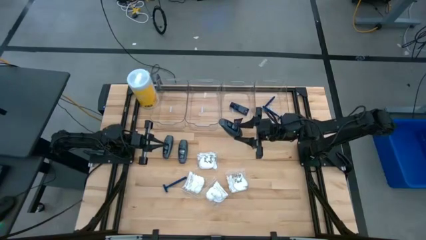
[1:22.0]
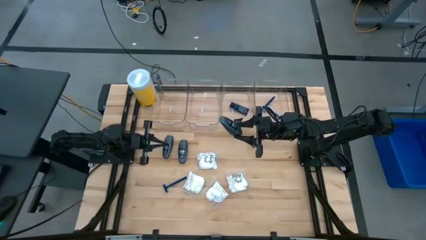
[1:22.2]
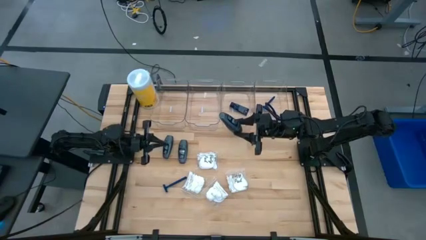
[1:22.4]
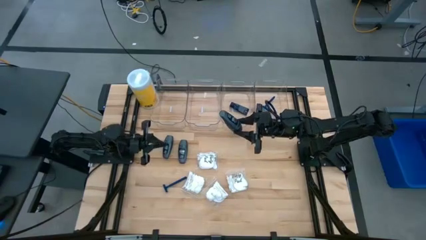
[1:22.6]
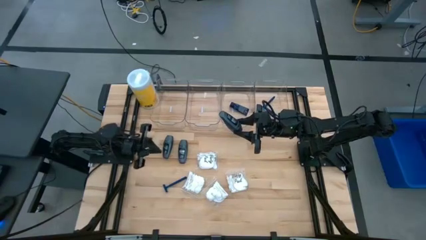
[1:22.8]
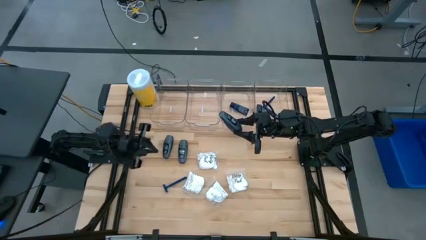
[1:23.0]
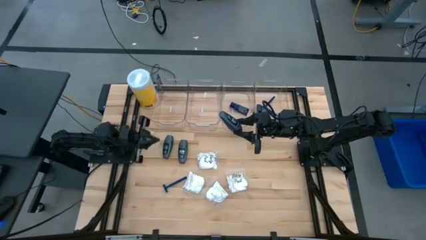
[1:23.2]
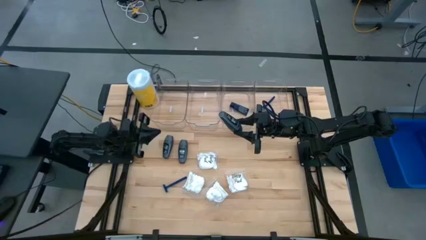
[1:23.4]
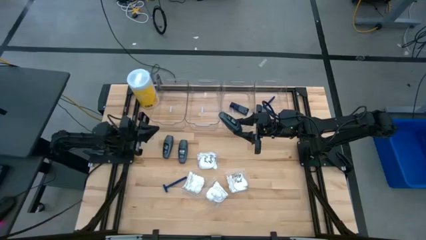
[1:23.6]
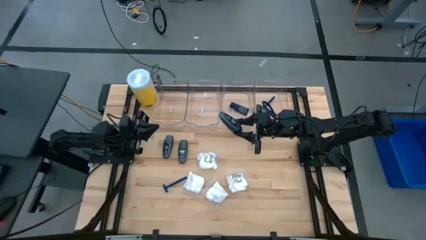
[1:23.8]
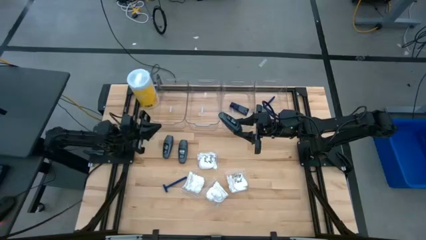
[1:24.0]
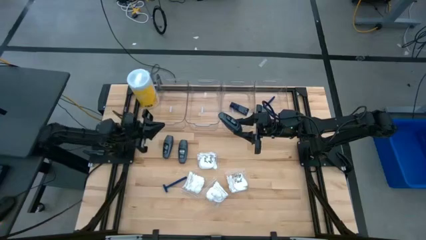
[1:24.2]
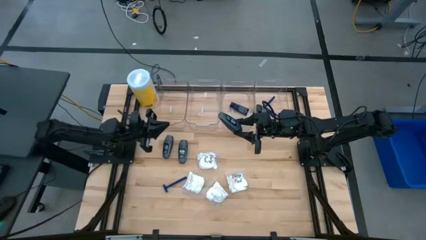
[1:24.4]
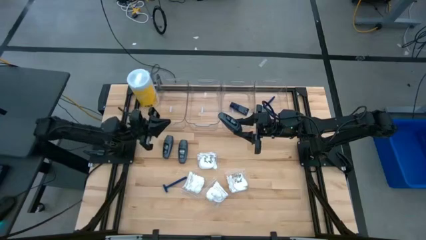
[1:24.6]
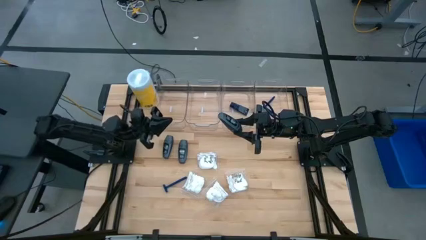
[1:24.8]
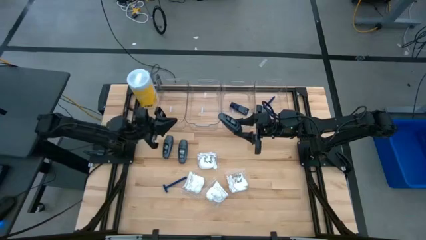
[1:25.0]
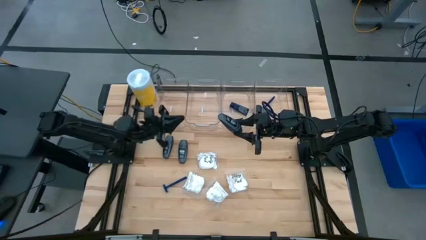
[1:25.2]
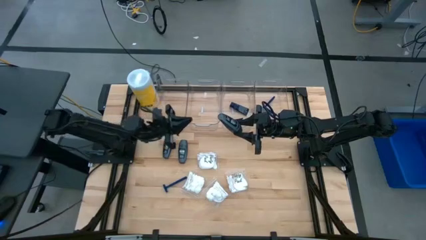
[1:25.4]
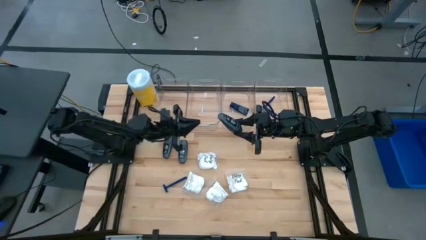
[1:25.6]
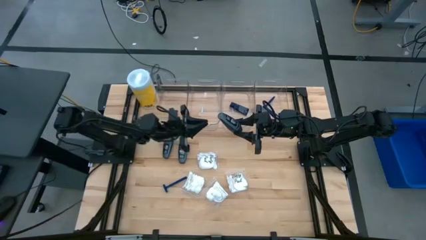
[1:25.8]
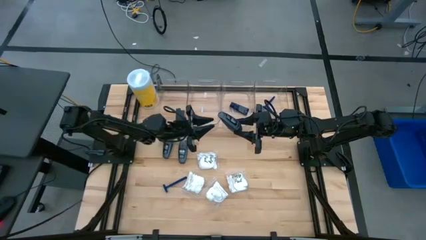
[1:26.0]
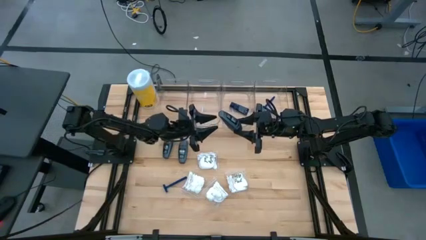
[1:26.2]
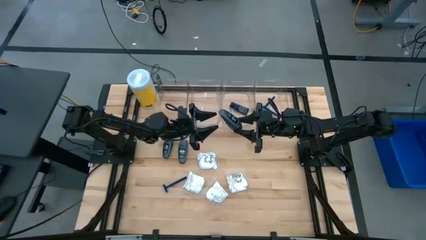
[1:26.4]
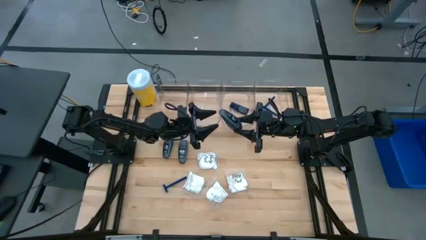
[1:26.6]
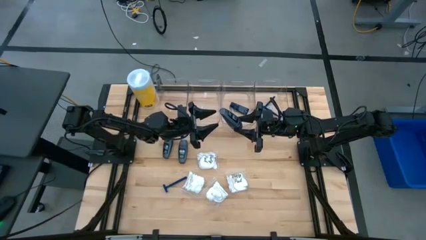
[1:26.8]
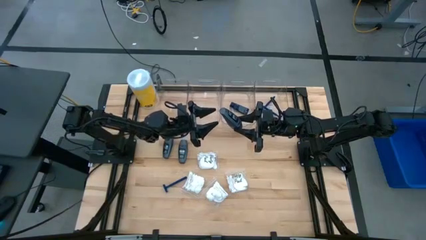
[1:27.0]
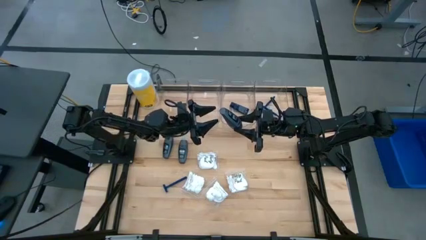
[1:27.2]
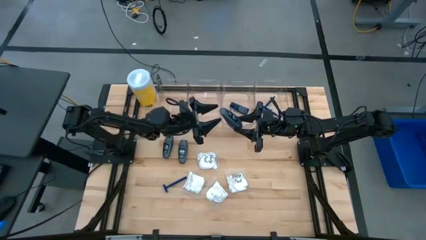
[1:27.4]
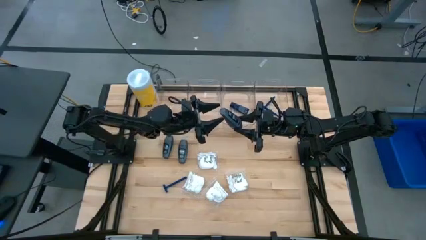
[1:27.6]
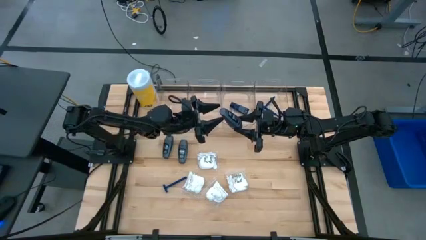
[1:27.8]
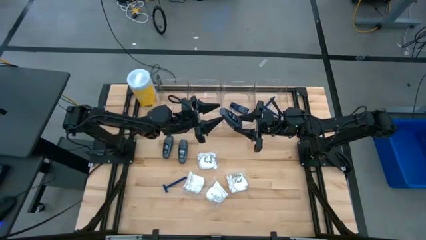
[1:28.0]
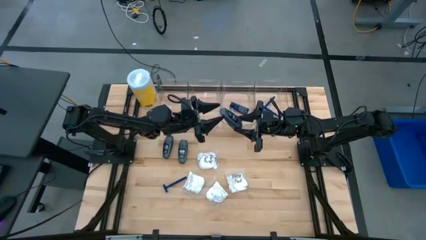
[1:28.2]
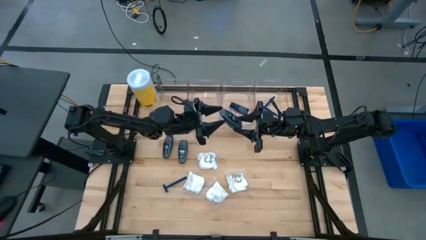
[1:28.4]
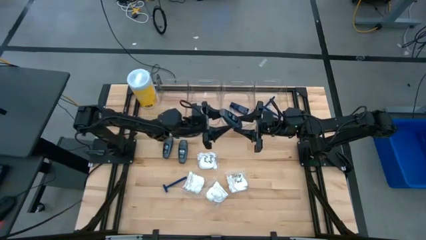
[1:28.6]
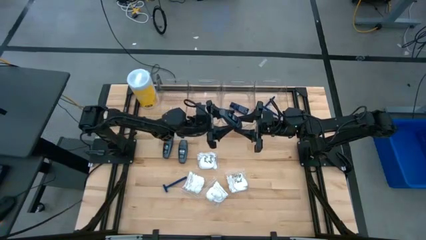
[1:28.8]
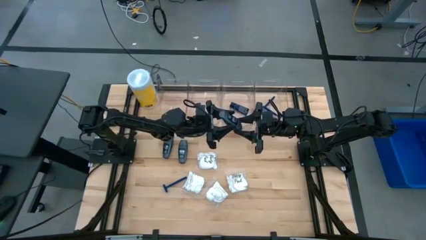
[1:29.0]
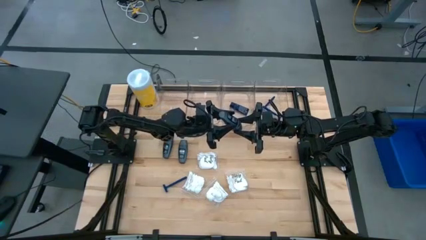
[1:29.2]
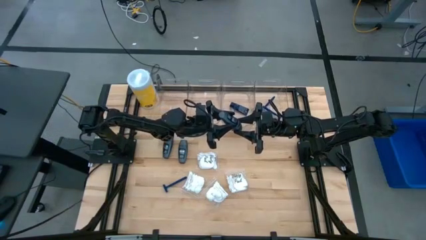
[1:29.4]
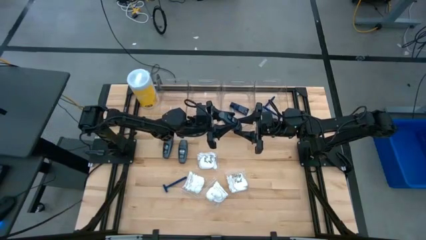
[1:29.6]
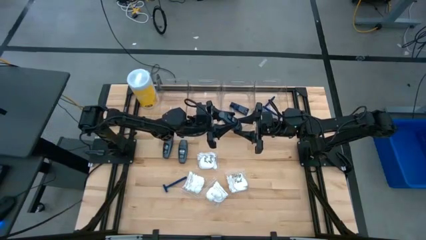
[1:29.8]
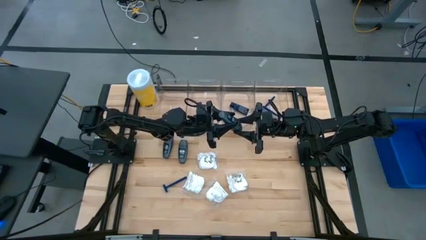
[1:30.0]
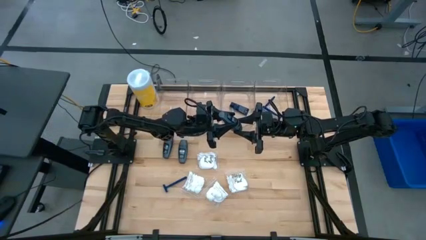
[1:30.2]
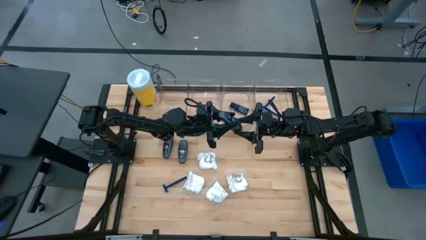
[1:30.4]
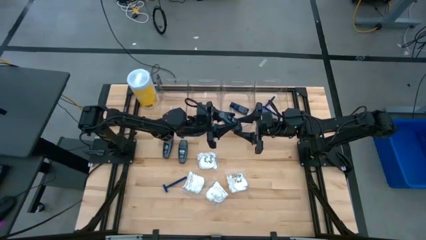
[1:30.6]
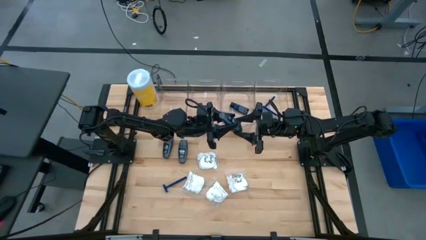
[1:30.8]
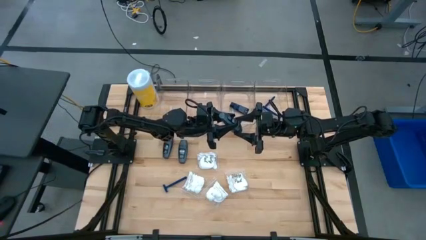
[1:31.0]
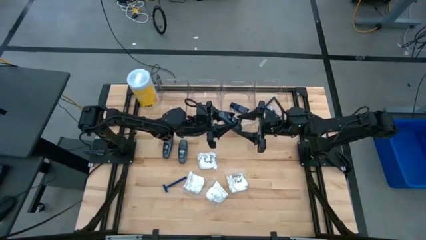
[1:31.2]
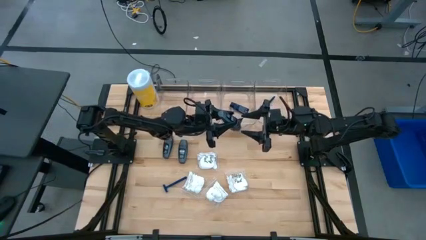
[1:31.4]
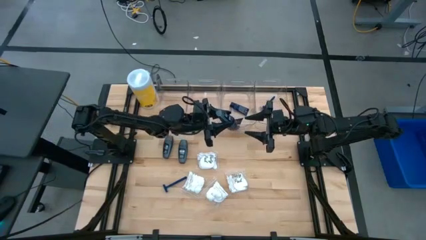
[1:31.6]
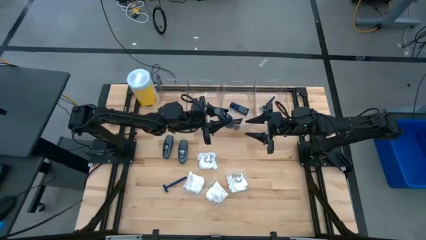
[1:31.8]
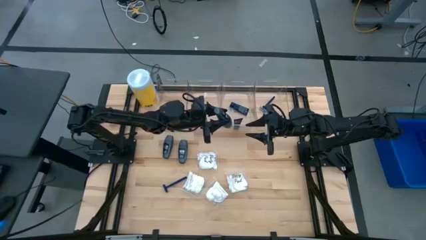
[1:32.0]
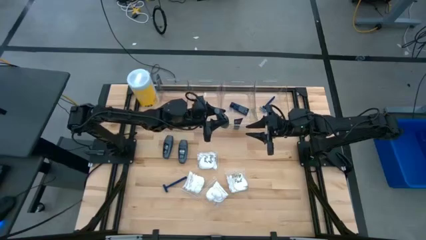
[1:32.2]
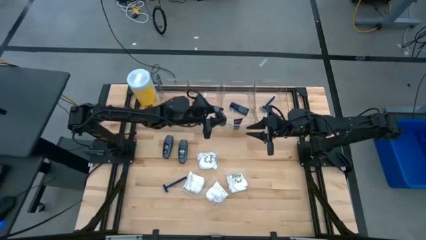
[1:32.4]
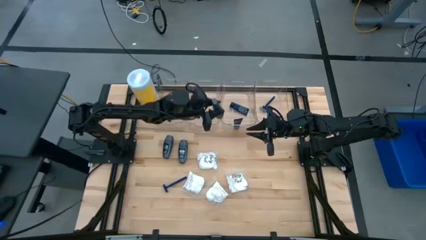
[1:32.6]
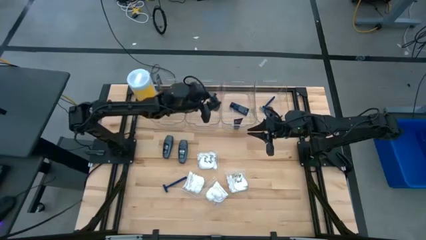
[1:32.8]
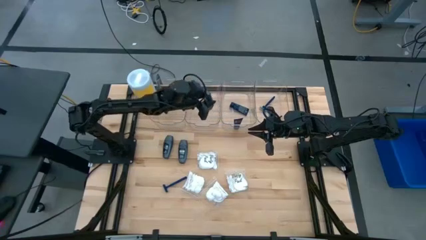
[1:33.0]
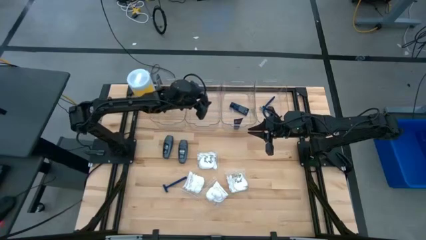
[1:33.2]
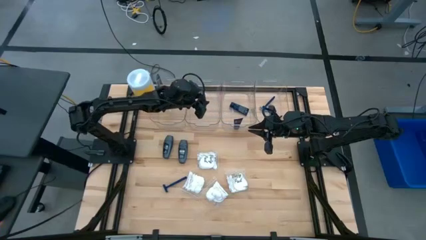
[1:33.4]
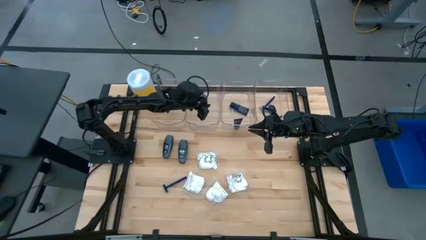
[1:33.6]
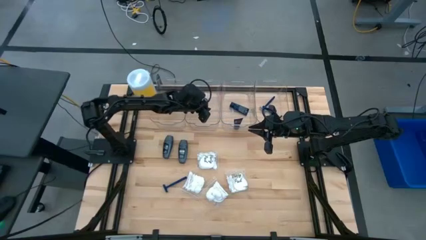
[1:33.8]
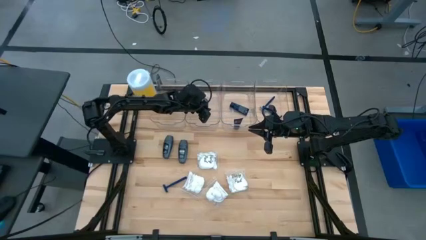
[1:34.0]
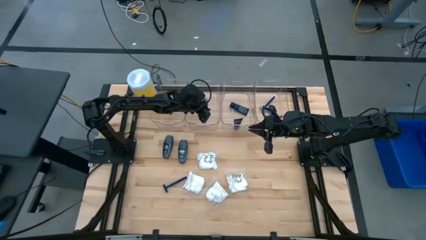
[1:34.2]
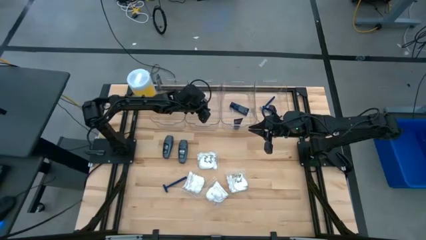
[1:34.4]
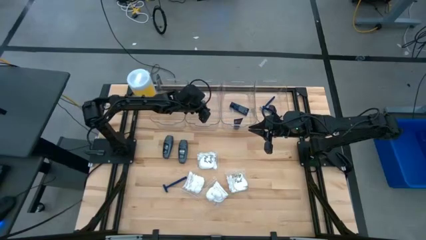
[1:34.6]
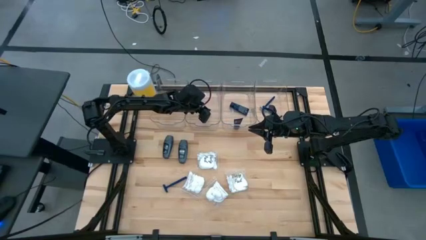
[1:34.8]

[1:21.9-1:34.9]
Task: Pick & Place Travel size toiletries
Put the black deodorant into the middle left transparent bin

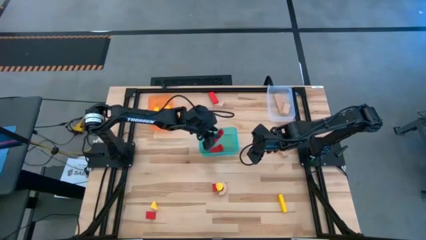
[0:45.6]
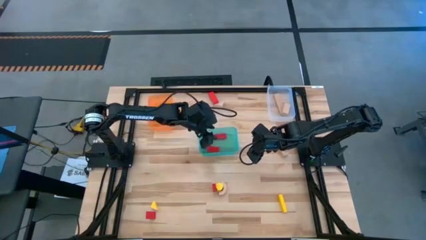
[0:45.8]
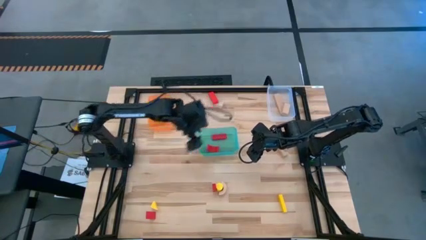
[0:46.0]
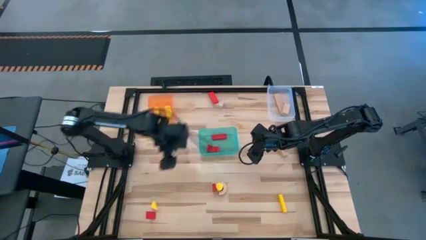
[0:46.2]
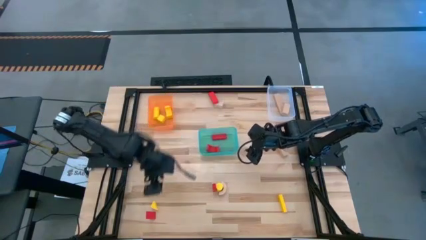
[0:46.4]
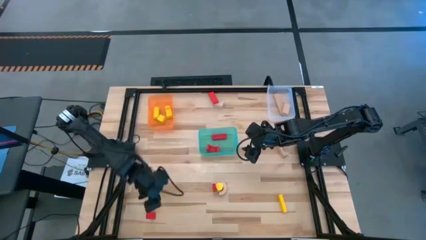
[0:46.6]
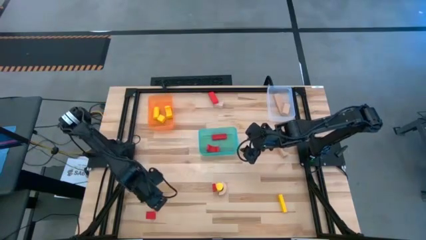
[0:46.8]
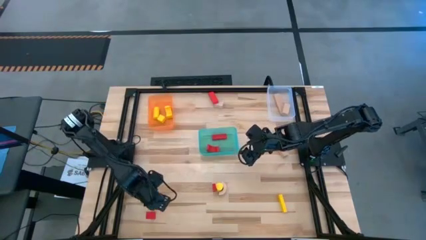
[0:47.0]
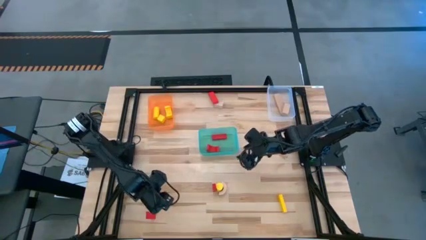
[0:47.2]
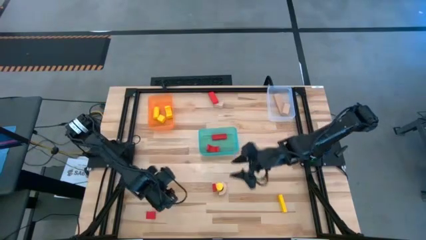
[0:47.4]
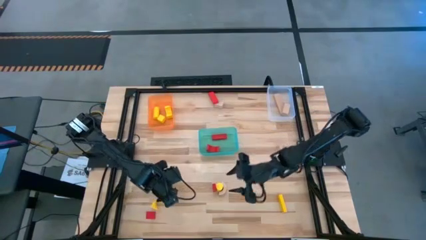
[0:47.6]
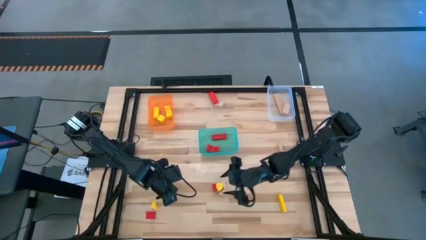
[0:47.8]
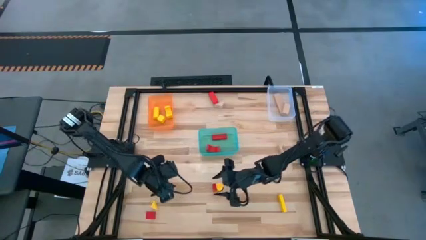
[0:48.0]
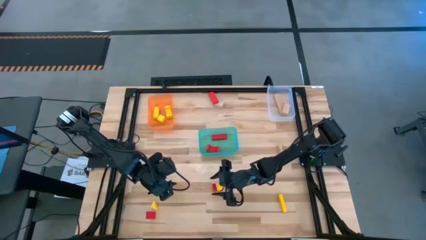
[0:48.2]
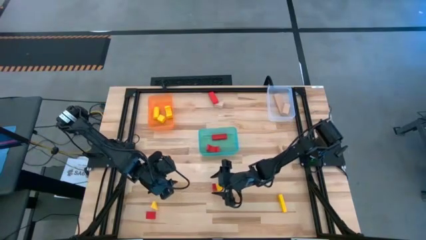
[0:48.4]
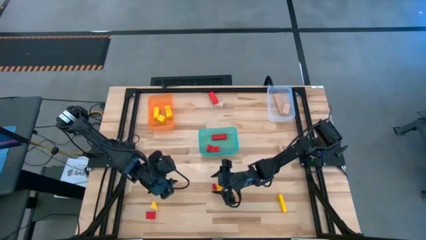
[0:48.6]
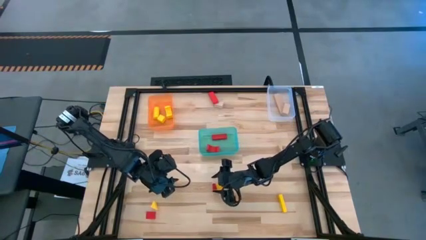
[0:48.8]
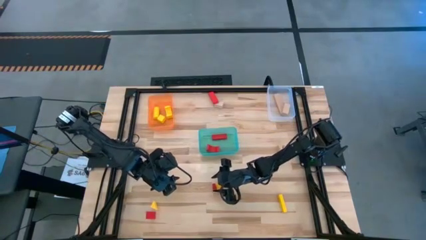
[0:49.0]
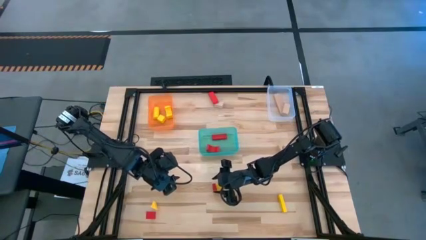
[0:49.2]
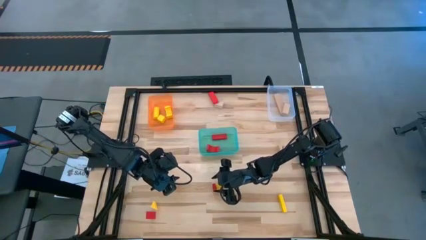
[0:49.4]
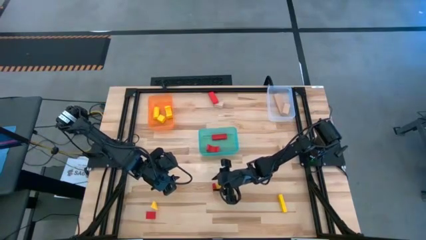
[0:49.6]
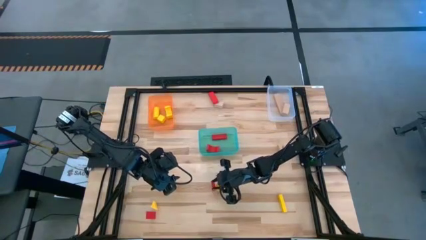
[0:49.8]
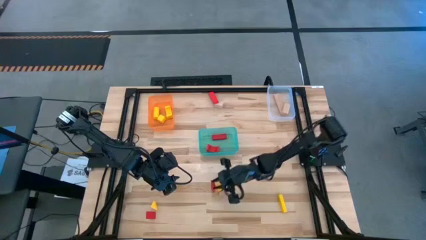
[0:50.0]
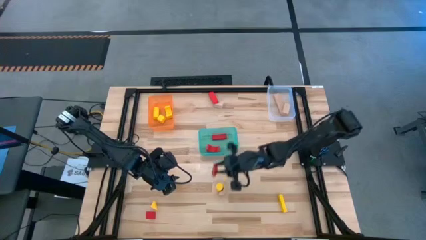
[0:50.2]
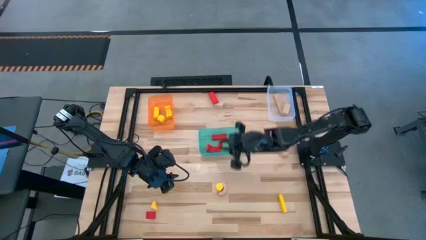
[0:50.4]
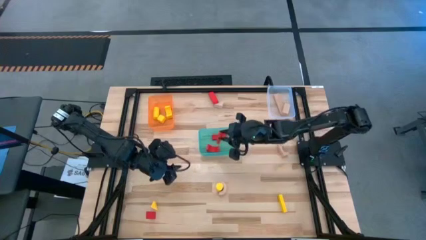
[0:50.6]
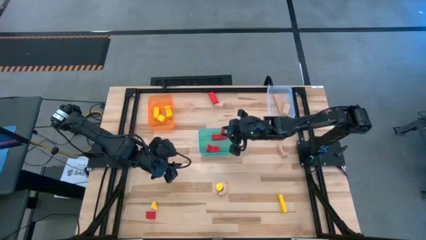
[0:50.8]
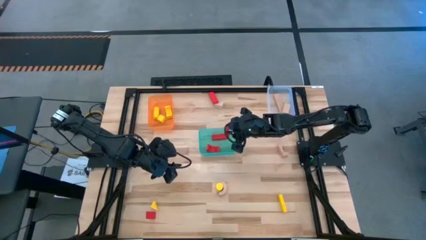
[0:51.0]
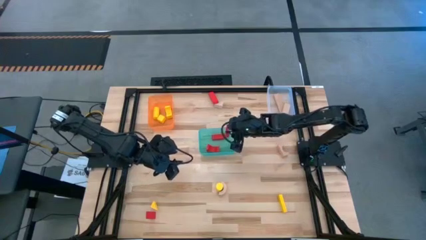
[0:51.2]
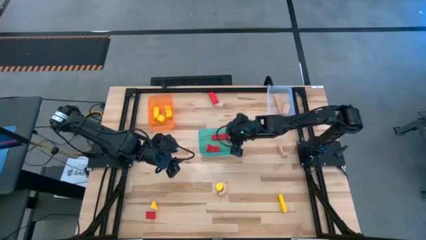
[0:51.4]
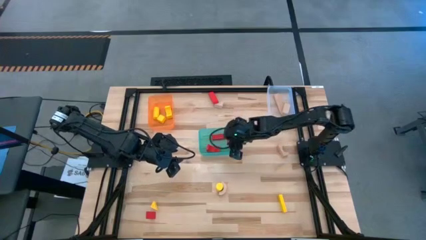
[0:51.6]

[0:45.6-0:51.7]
Task: Sort & place blocks by color
Put the red block into the blue bin
